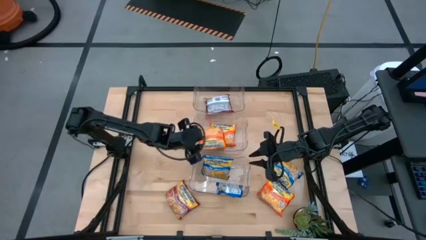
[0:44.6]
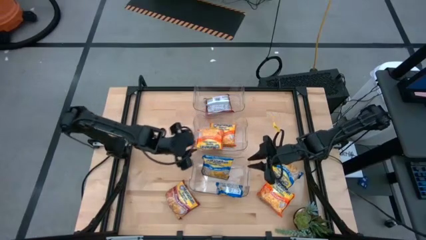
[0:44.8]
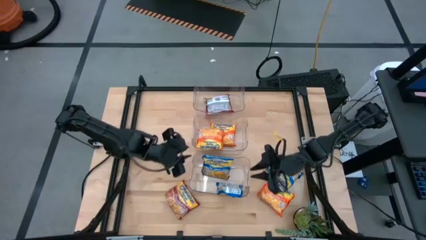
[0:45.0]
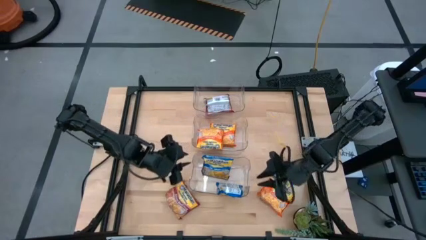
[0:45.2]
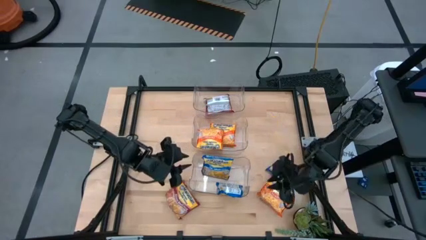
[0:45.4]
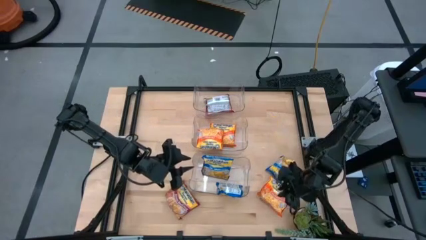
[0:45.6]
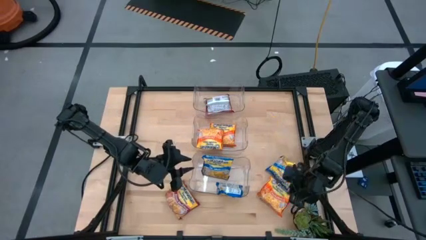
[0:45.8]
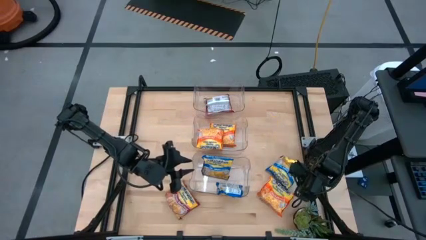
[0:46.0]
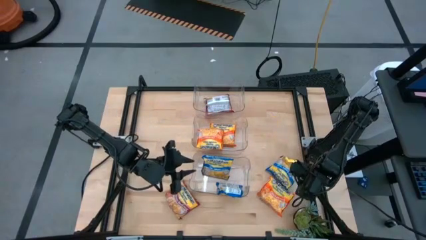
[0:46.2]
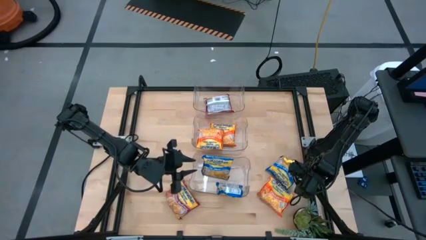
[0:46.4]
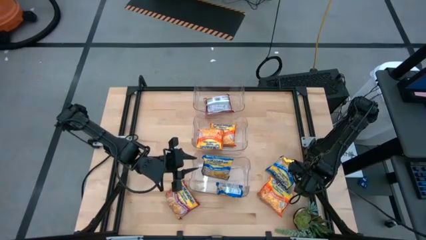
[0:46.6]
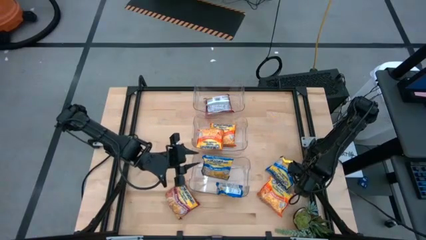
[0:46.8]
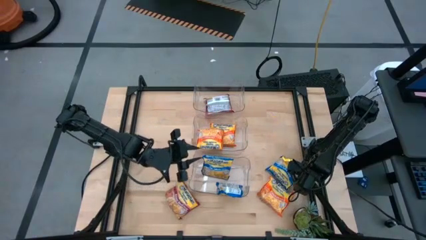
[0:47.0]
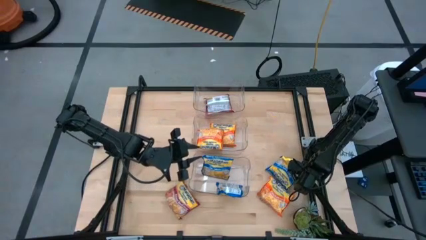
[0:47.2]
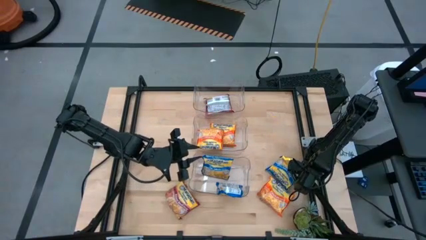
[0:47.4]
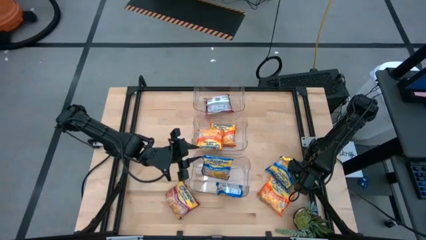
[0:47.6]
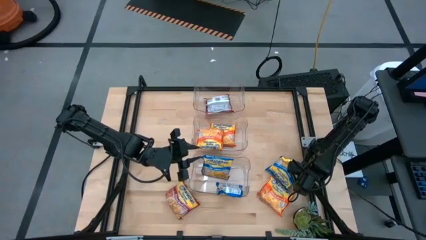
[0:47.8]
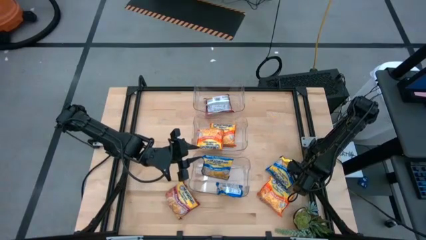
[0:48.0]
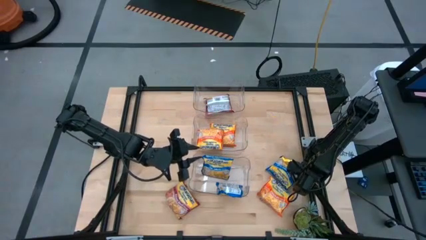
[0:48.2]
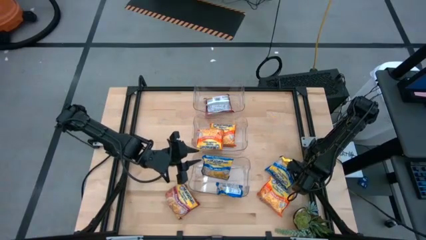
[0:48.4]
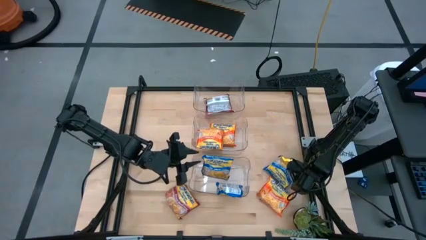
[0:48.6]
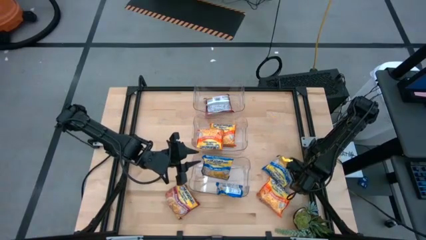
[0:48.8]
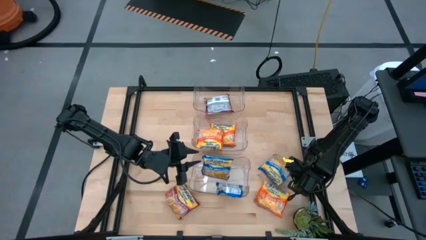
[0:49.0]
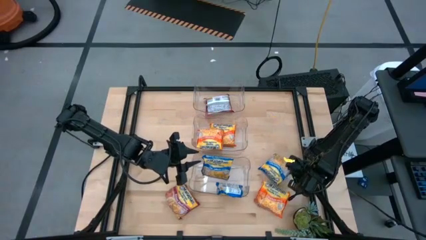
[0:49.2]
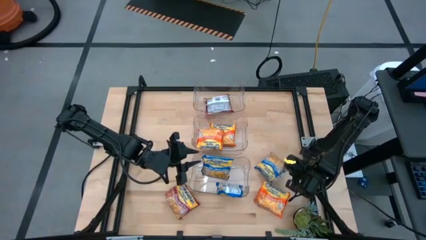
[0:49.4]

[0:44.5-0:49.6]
Task: Sort Maruchan noodles
Put the blue noodle pack into the bottom transparent bin

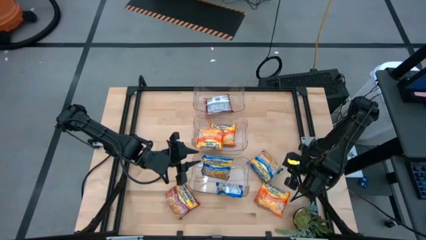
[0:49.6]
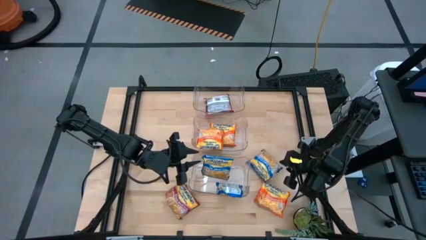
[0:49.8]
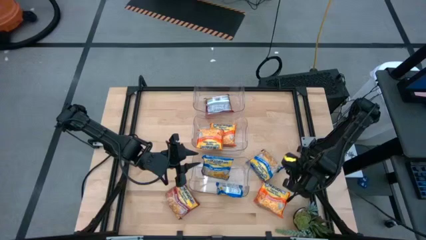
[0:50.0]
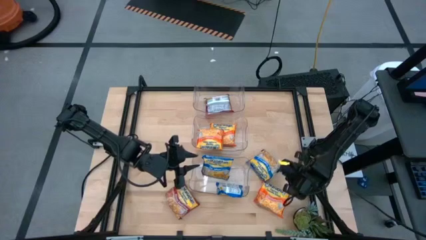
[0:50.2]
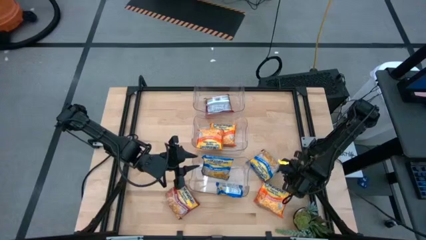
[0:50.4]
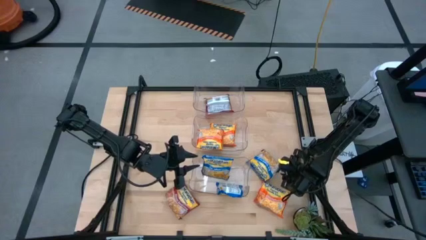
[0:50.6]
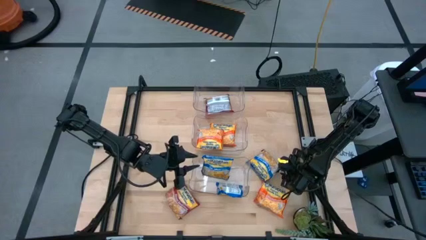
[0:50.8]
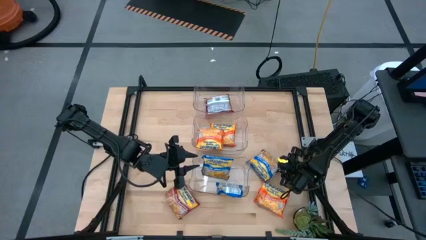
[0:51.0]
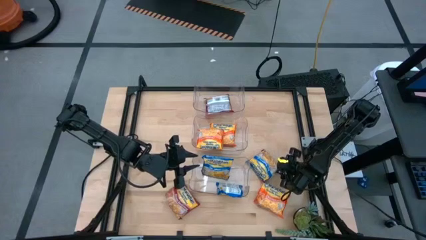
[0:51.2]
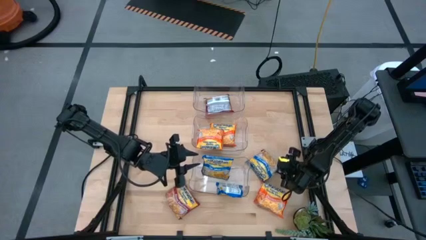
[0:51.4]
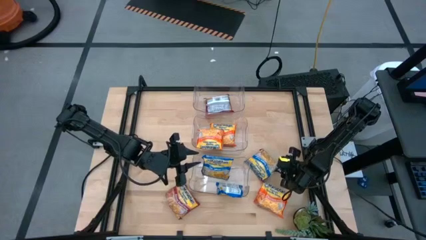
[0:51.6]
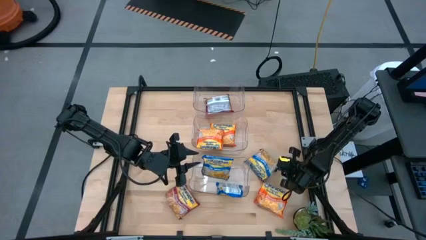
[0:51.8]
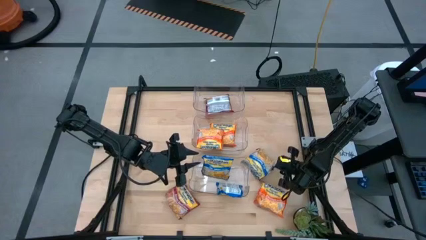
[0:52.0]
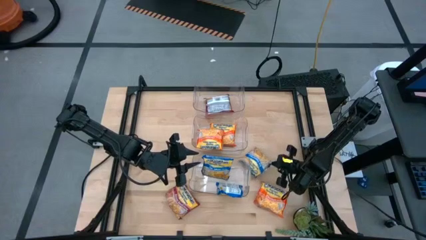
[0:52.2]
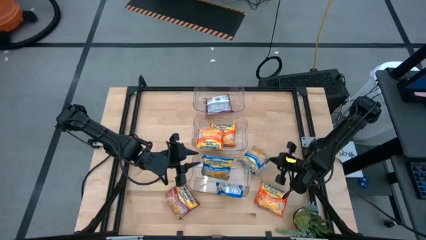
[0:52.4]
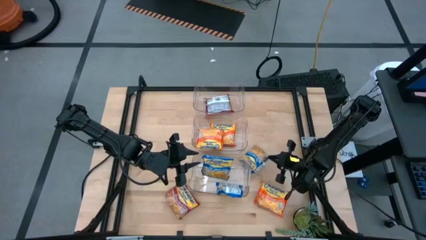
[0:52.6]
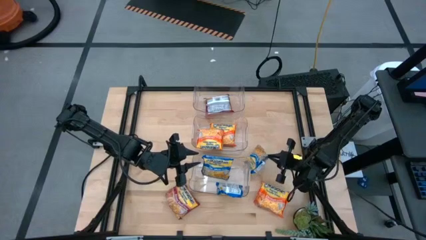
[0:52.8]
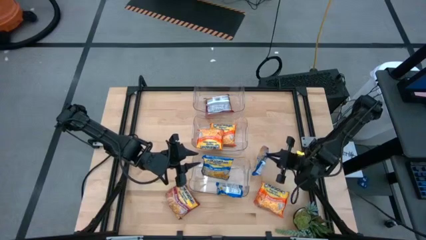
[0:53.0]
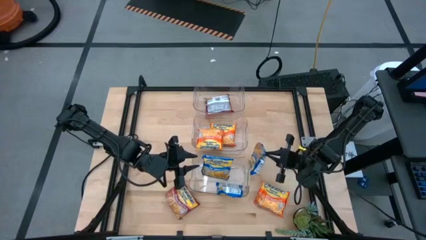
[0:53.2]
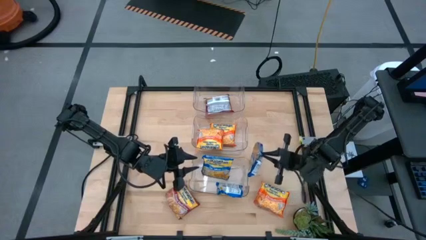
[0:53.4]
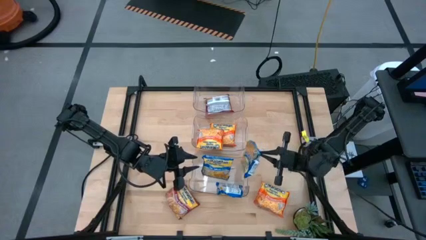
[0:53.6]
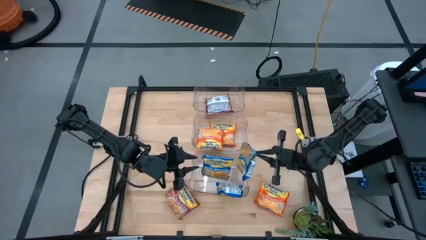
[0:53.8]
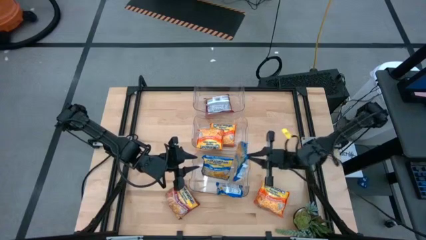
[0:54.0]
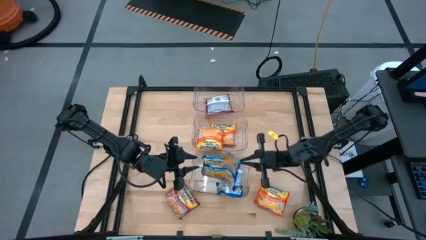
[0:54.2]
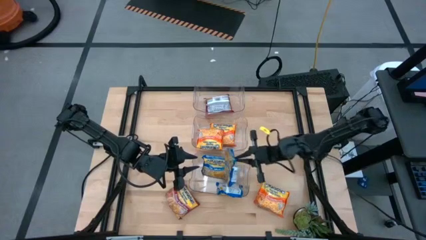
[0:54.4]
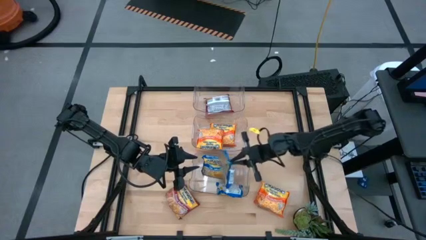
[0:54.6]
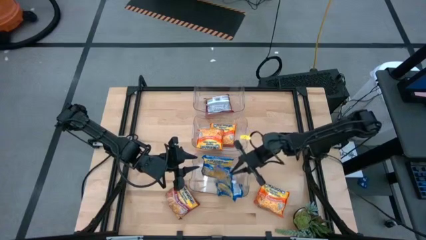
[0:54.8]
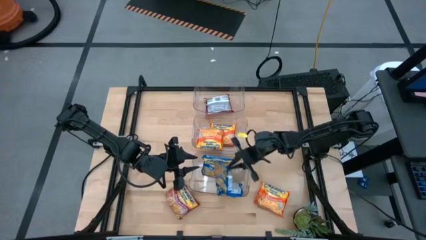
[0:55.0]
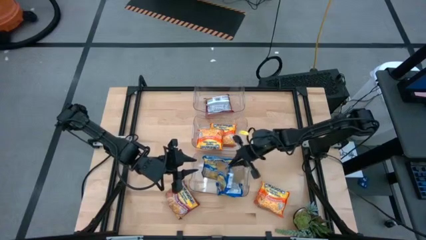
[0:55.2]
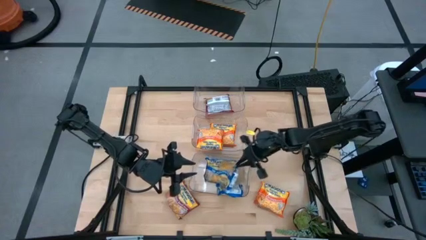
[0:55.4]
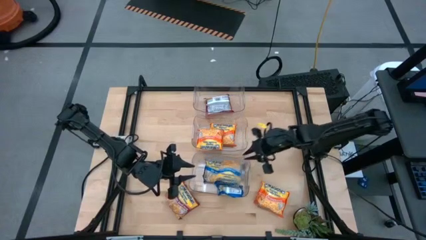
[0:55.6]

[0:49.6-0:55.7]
Put the blue noodle pack into the bottom transparent bin

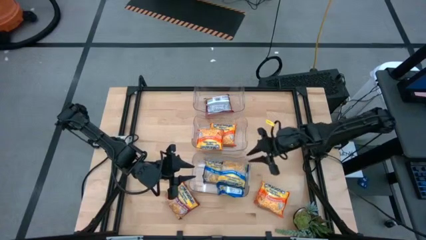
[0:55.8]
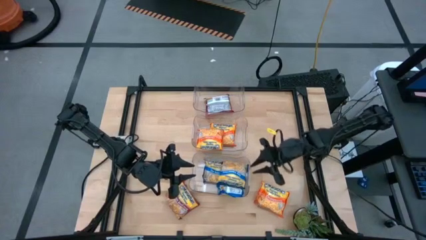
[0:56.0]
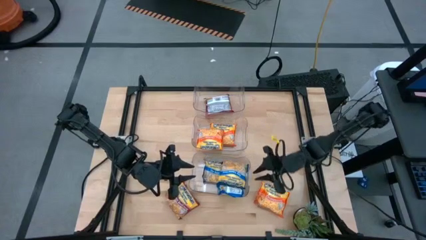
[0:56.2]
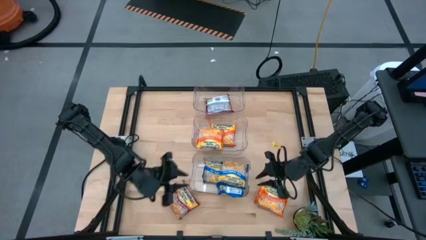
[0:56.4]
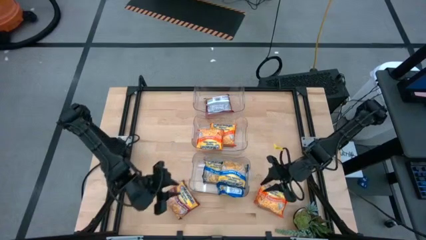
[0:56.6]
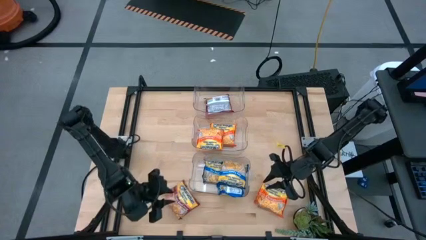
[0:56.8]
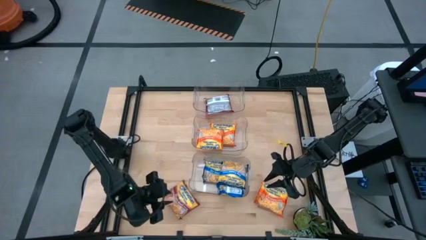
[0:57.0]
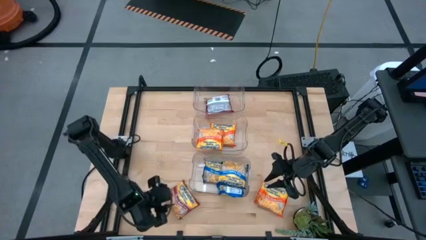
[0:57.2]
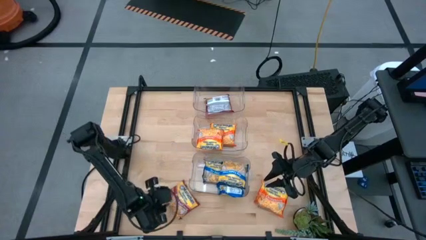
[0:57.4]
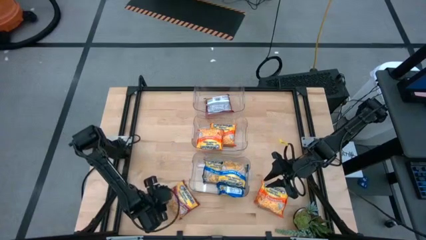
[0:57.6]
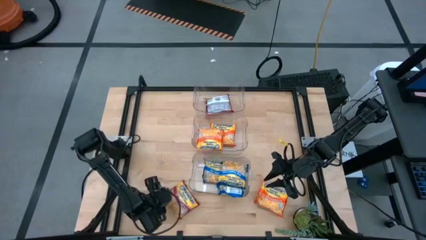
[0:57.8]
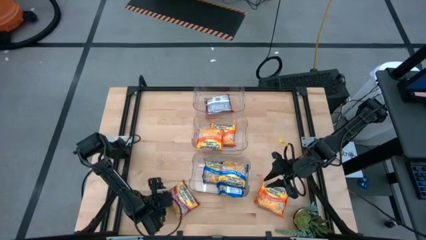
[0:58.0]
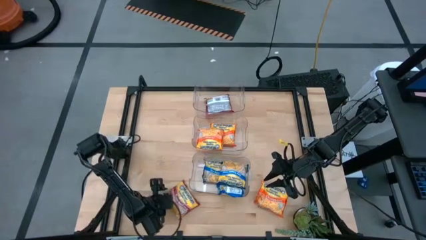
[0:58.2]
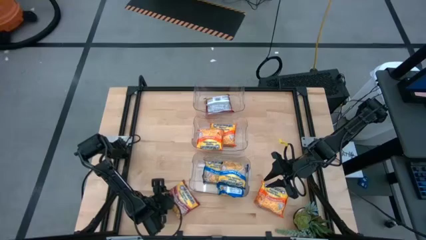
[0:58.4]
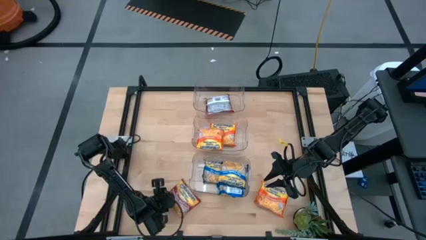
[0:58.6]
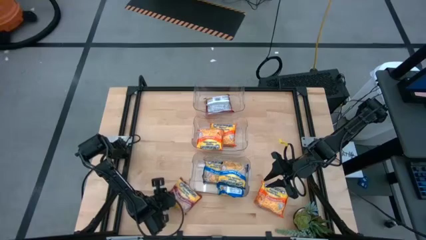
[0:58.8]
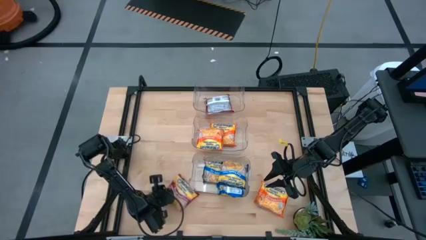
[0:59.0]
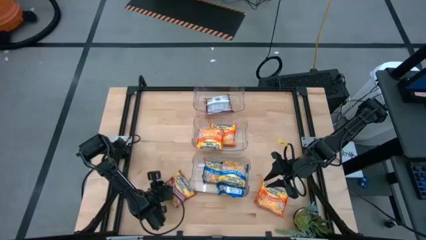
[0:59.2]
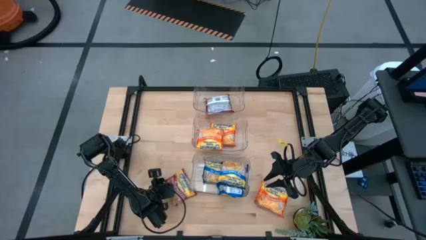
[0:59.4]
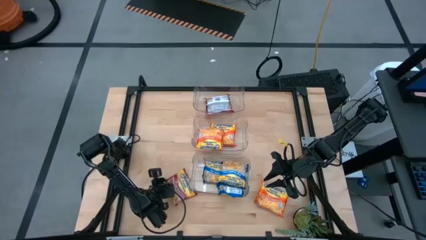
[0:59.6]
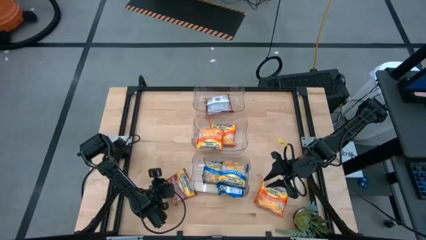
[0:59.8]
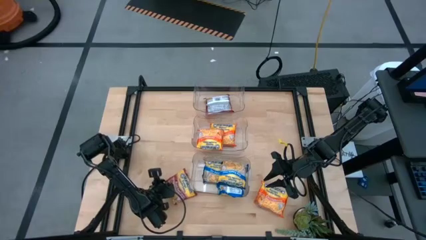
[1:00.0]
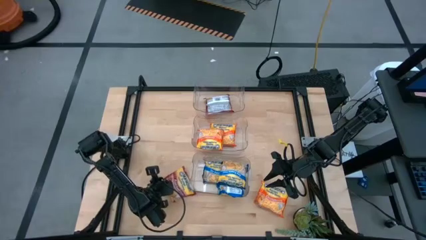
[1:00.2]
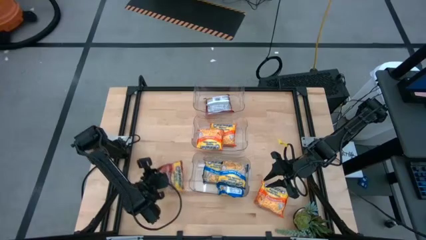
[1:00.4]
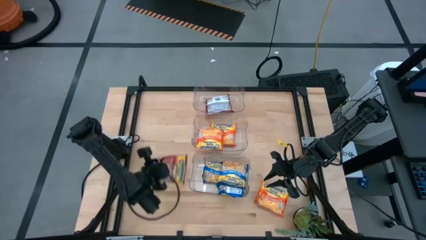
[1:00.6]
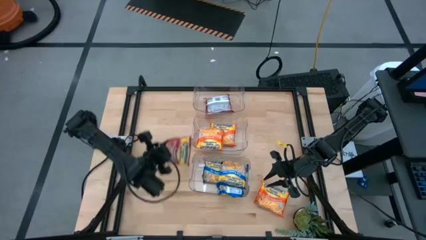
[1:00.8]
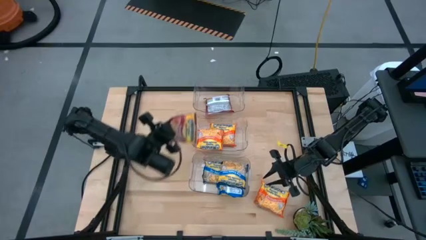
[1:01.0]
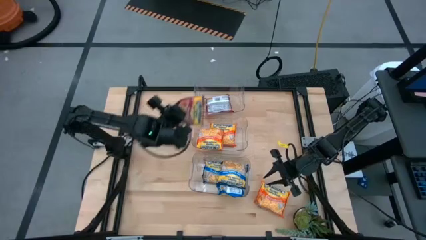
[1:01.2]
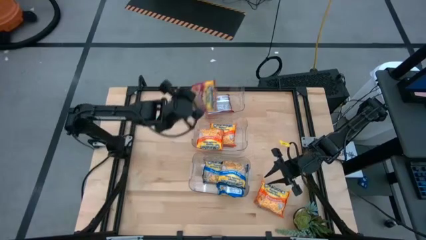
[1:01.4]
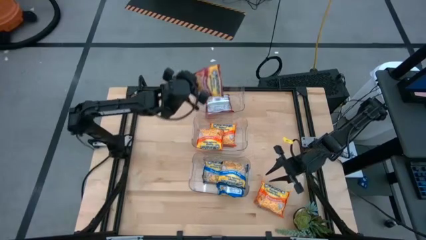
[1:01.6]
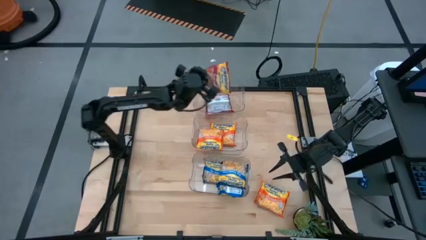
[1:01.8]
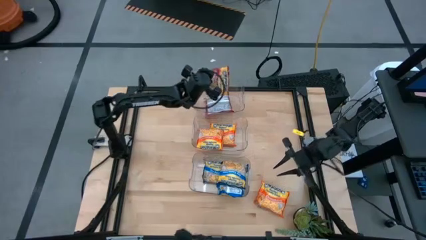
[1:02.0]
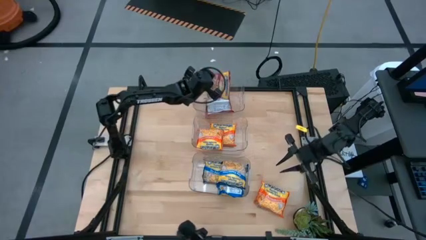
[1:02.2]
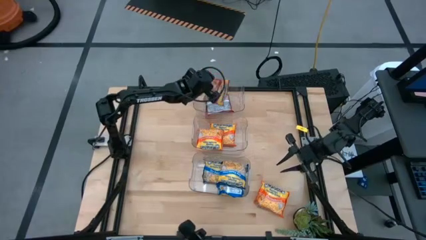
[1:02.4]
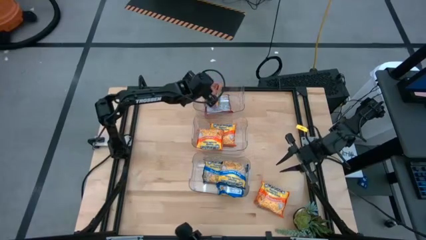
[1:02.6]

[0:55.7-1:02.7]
Put the red noodle pack into the top transparent bin
